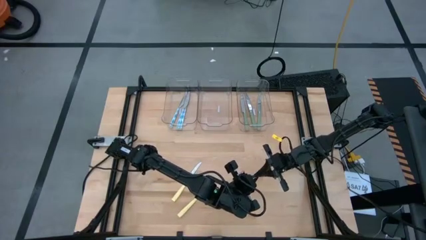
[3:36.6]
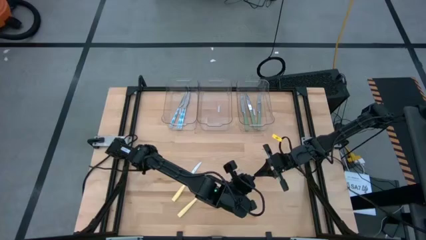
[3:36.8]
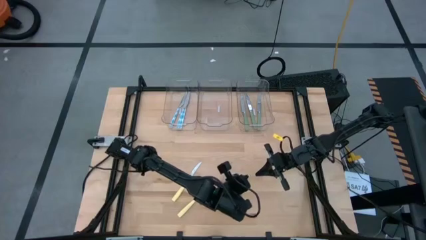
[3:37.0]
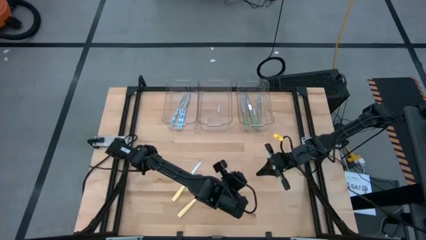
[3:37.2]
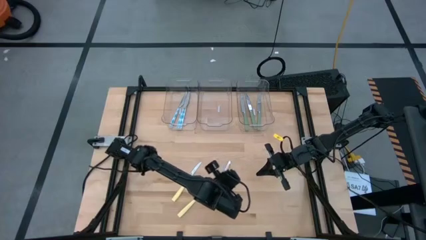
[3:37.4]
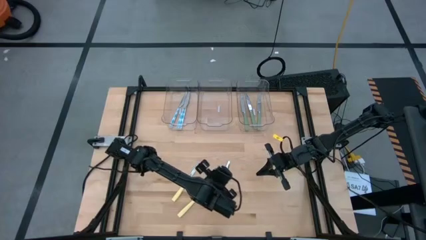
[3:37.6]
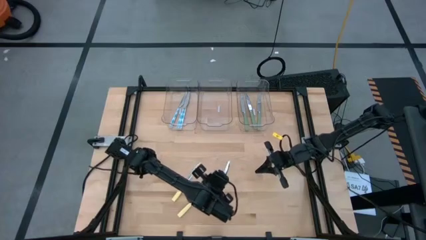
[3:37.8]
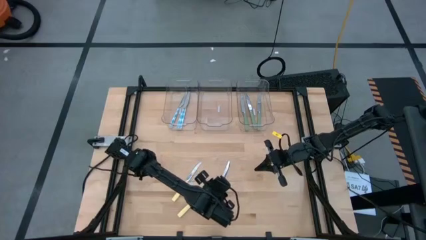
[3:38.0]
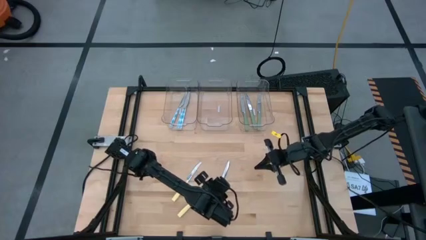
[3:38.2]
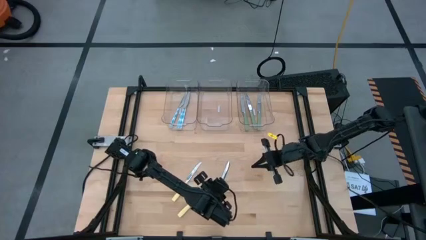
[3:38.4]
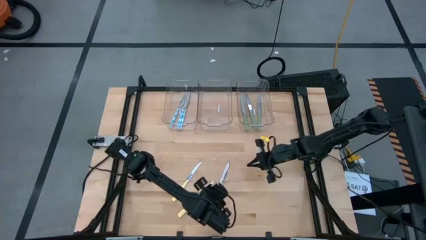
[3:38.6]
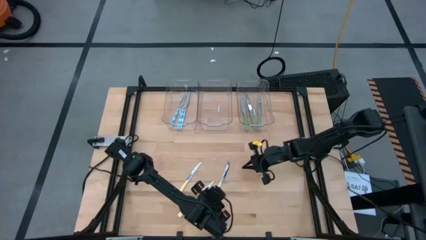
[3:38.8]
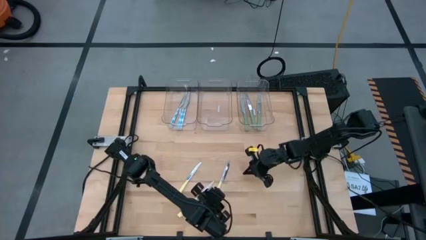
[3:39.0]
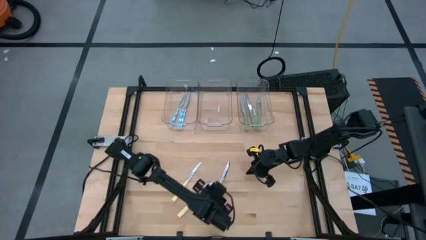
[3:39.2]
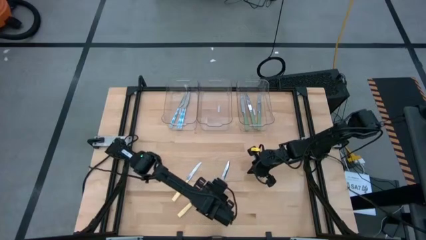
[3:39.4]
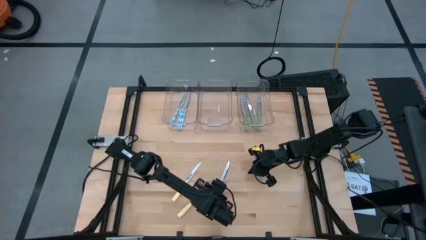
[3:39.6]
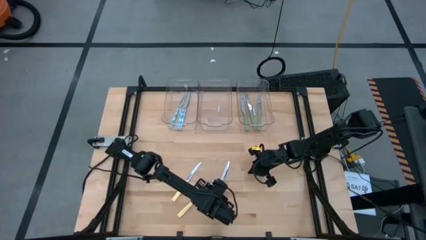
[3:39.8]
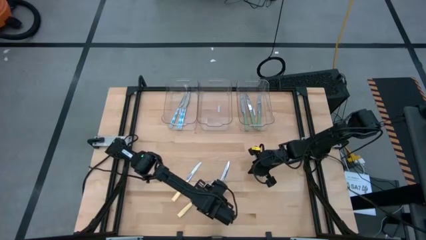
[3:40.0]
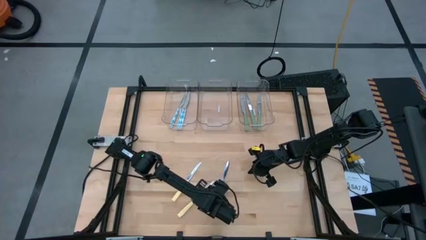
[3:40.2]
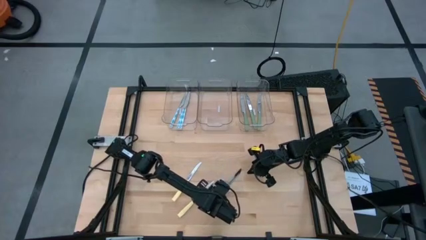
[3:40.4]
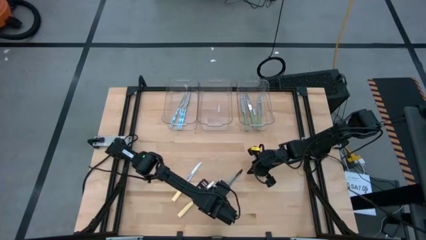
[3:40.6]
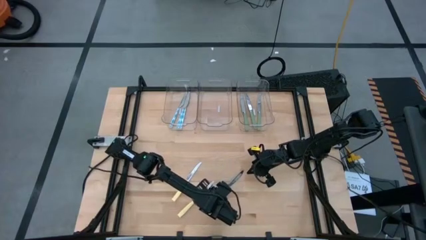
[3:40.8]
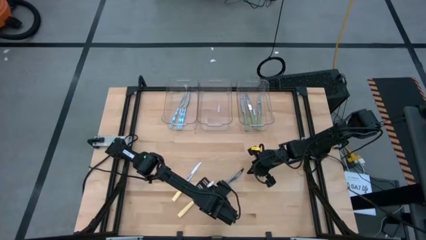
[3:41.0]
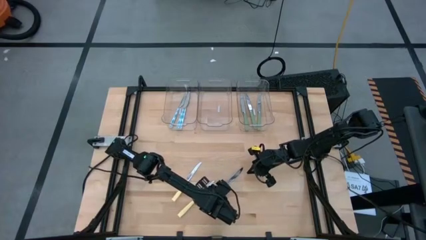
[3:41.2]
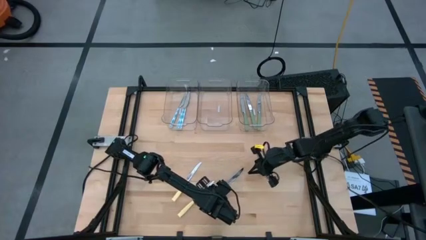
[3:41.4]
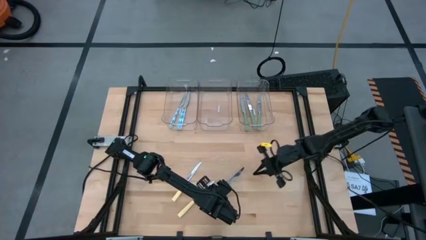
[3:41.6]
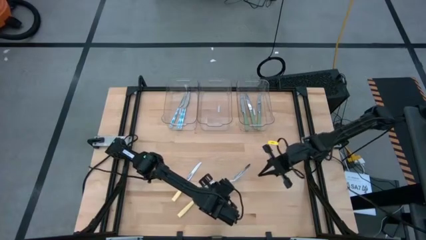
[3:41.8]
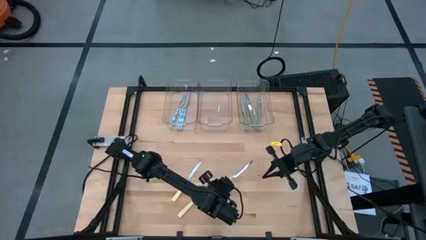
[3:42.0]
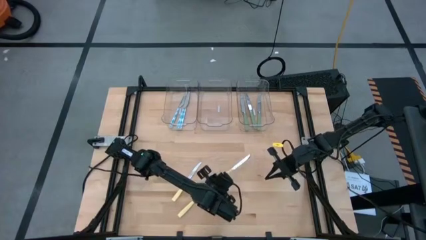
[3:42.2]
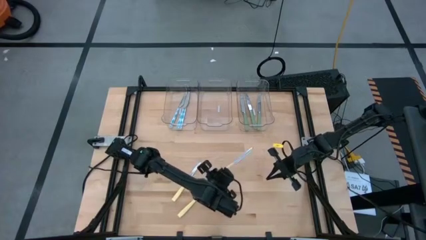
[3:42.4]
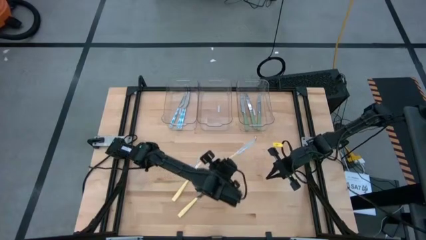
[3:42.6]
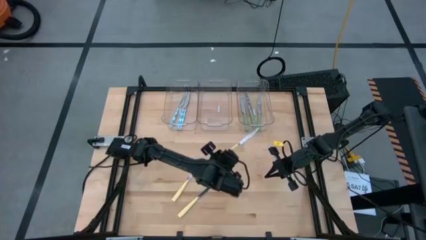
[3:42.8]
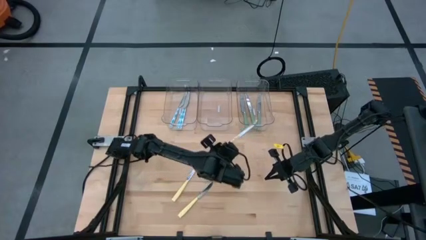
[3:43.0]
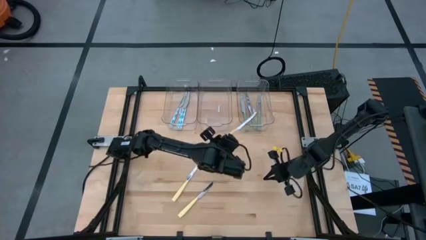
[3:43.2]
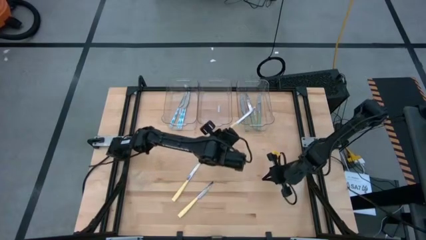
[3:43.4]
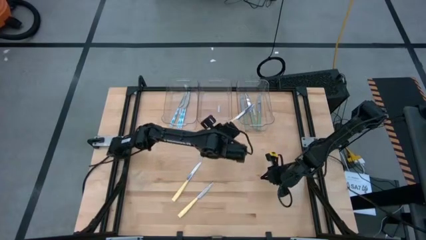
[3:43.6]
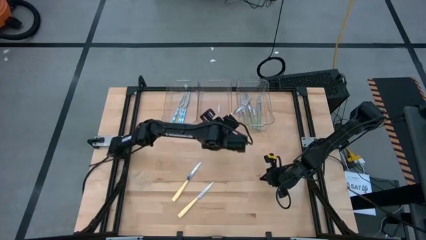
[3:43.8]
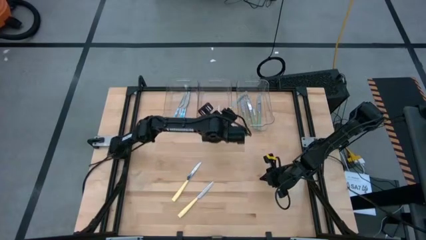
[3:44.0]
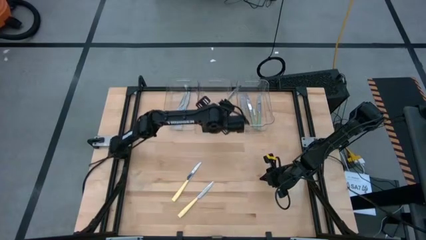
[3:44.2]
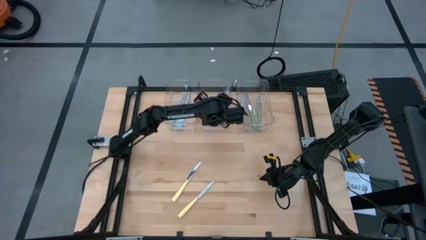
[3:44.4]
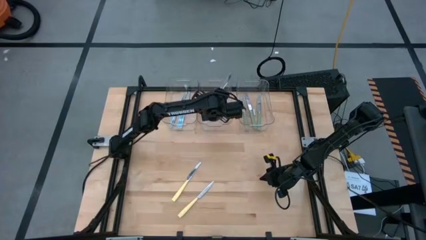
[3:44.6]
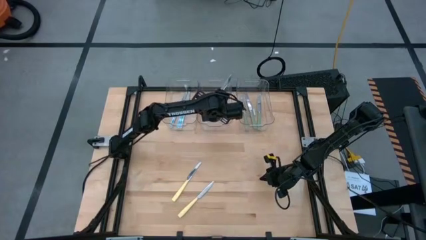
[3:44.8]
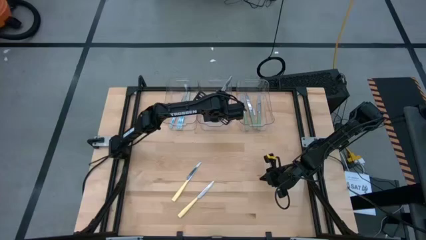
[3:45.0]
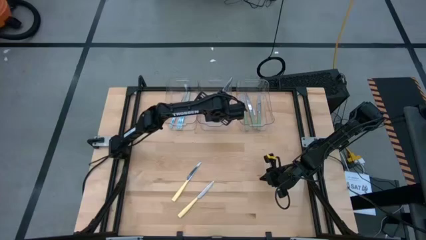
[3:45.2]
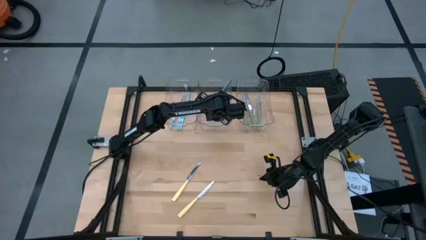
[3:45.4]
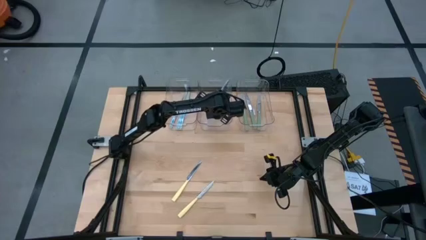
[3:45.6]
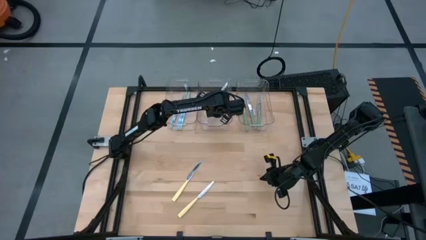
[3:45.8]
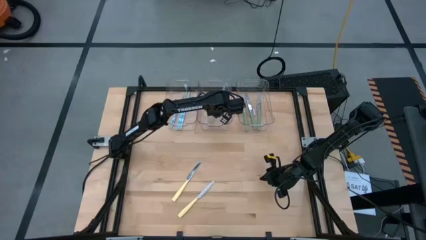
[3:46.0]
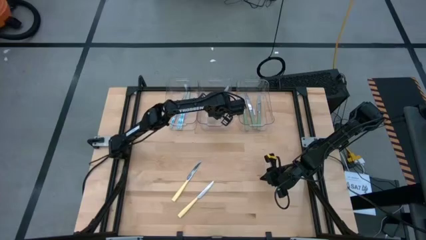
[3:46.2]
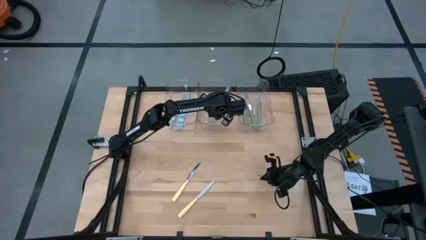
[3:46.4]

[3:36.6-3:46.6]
Task: Sort silverware by color (type)
Put the yellow knife into the middle transparent bin

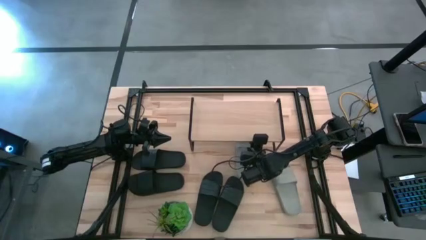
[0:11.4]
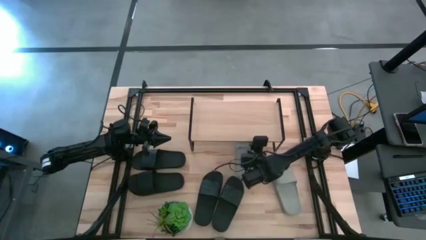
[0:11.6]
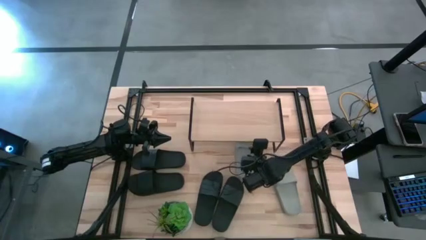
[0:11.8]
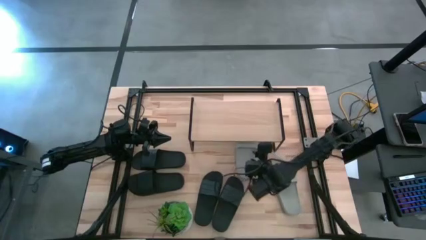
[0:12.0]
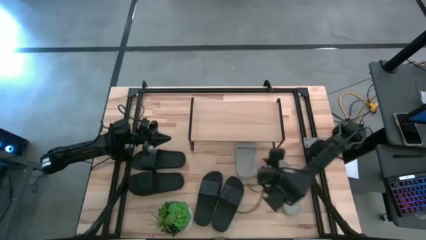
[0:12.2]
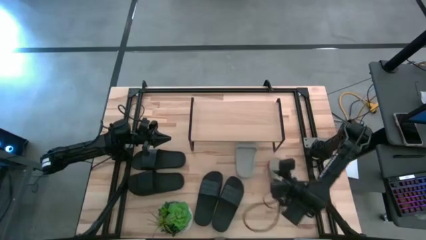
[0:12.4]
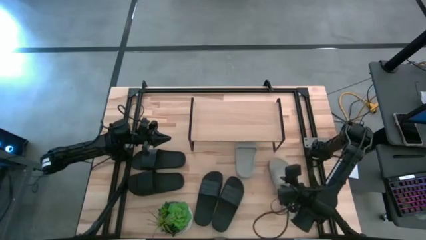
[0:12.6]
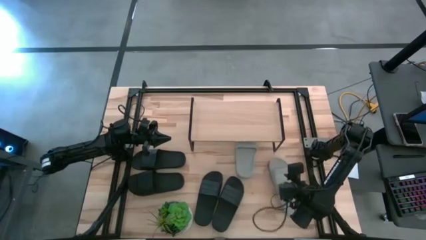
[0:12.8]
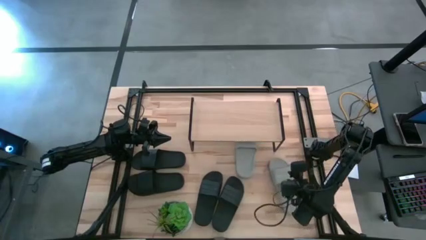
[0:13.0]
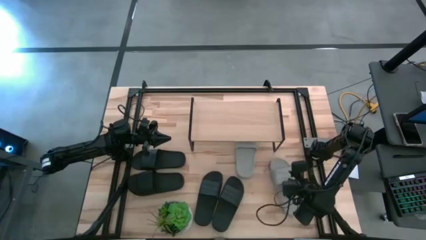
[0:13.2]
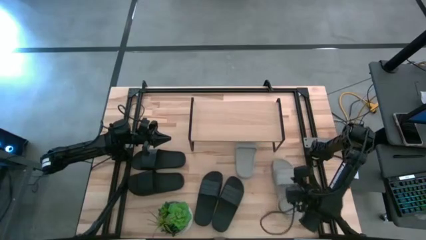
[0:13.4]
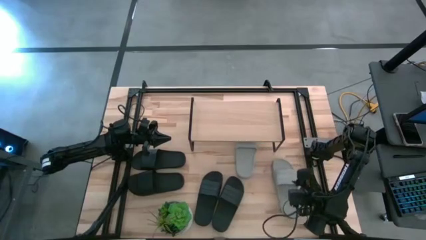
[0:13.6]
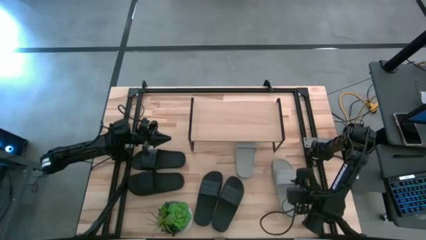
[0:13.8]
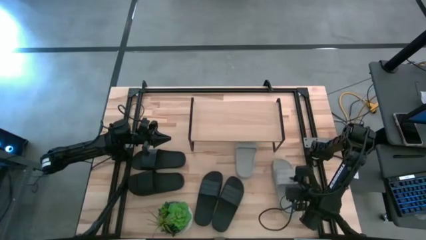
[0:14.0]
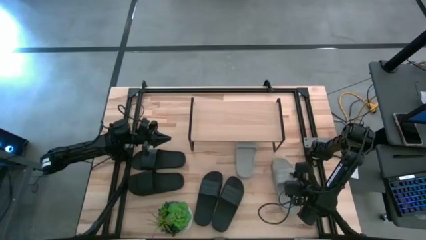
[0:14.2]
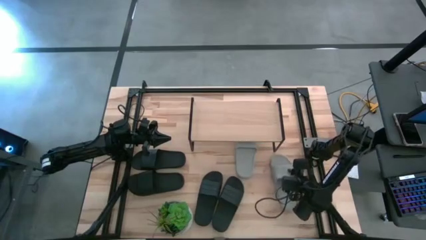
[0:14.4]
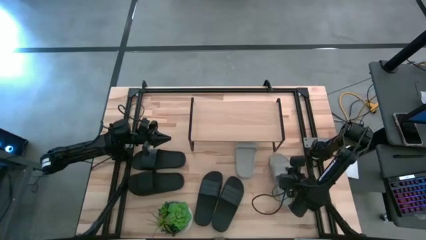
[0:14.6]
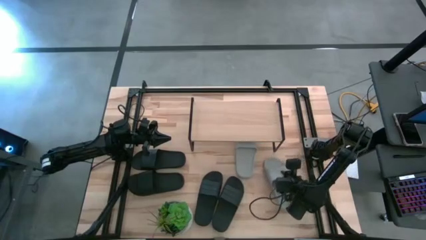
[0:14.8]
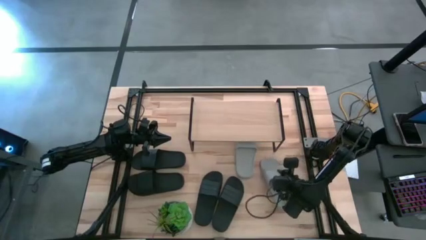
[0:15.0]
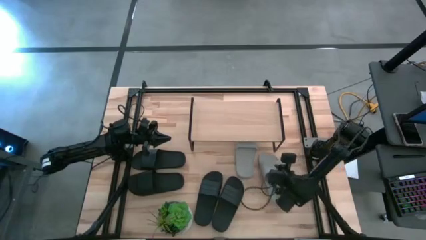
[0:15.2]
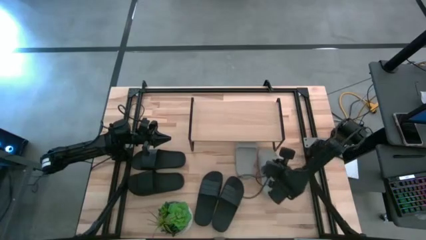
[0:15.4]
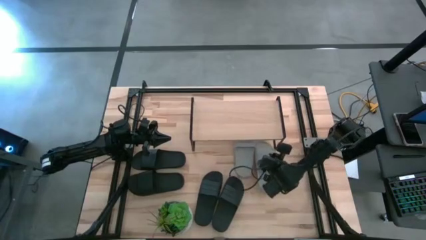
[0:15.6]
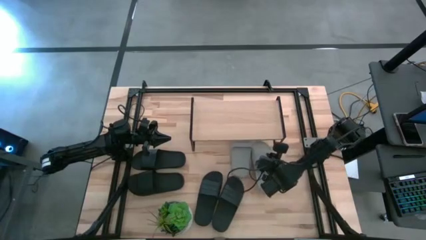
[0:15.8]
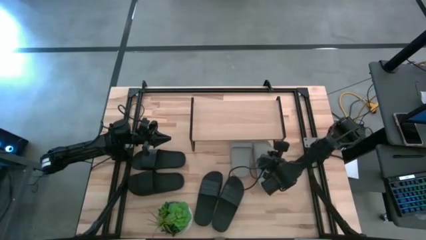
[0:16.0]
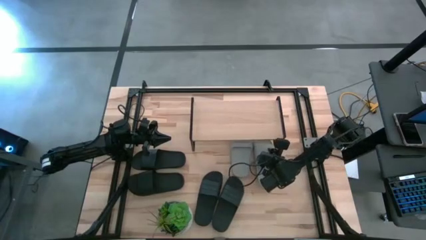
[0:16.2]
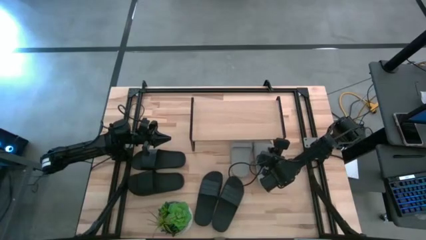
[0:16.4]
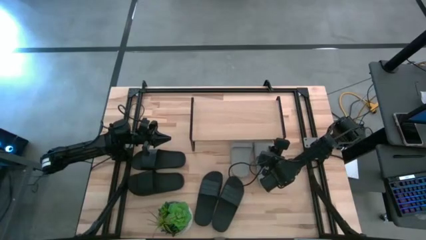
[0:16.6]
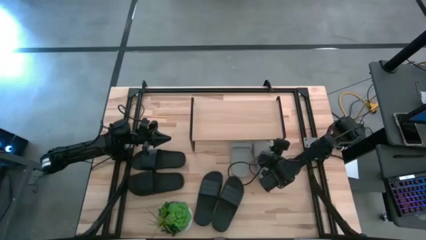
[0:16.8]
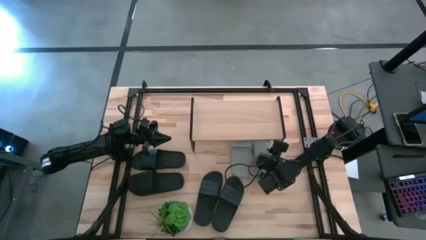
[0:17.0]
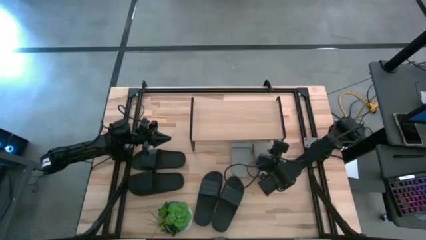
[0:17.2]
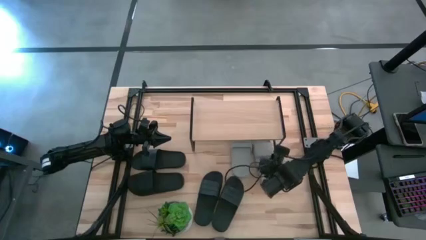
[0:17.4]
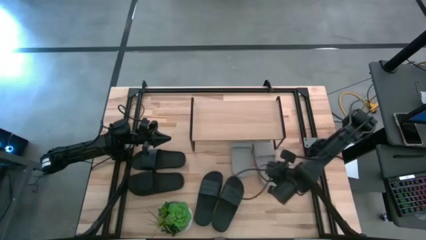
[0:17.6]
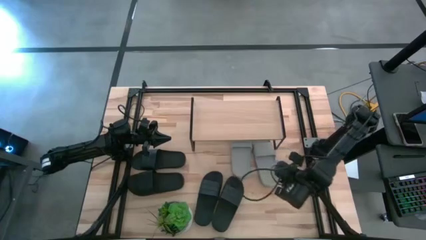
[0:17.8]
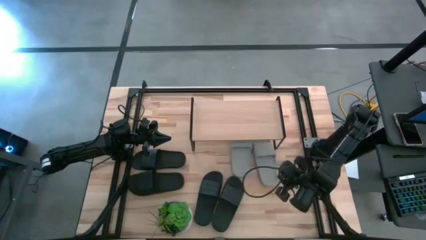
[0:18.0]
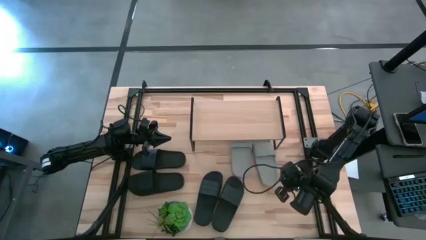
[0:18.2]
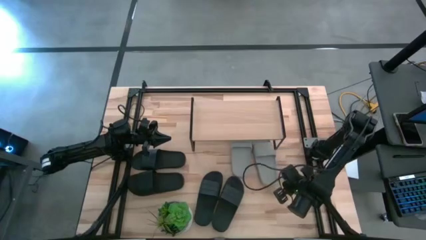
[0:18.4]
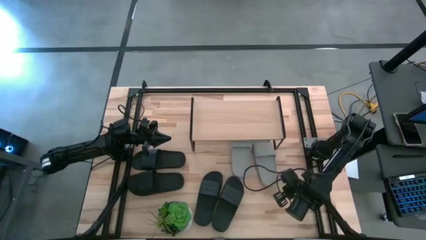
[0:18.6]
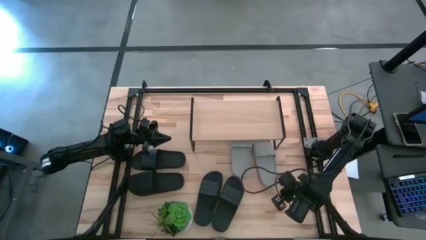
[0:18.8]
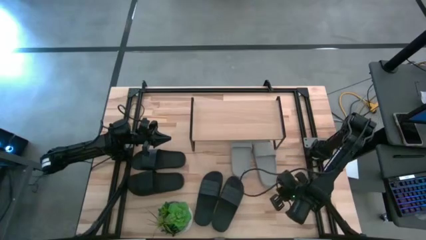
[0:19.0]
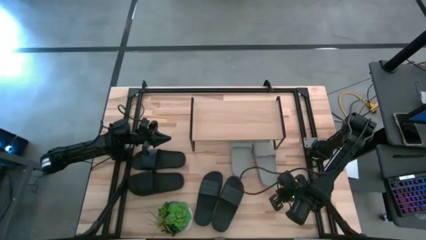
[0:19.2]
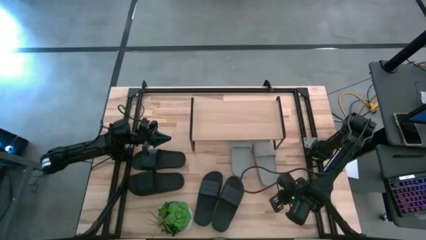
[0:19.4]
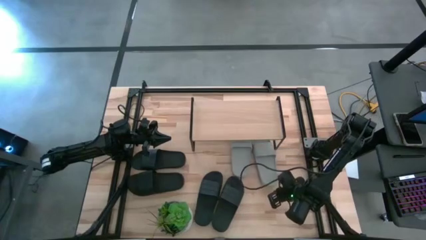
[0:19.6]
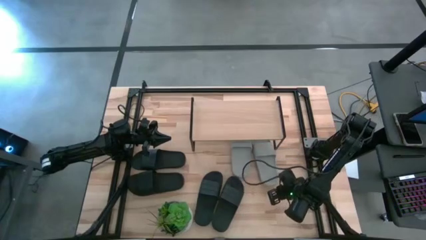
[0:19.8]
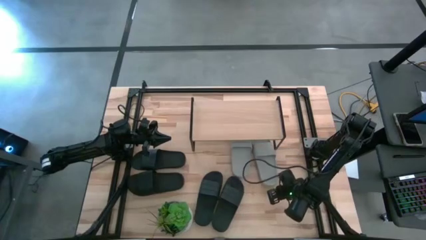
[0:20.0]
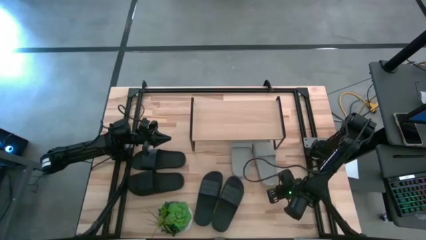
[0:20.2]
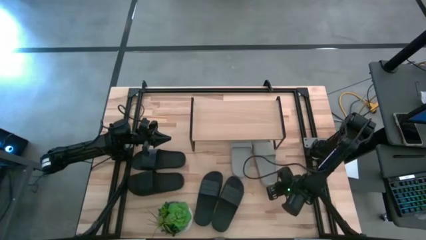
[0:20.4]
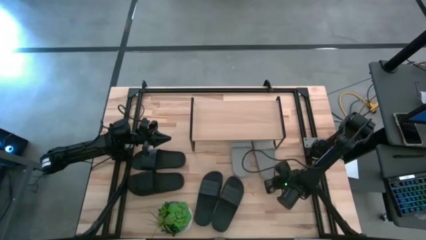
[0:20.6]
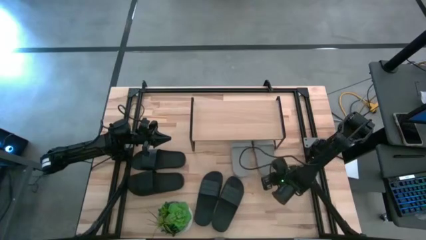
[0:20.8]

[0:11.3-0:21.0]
Task: Pick and place slides into the shelf
Put the gray slipper under the shelf
